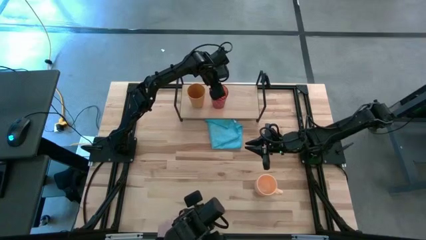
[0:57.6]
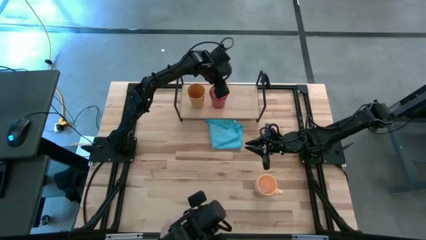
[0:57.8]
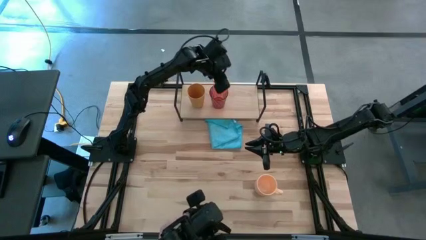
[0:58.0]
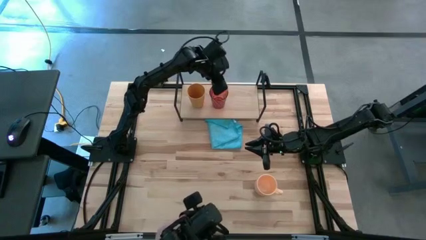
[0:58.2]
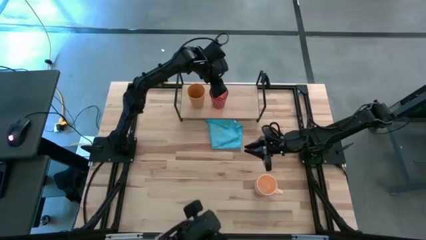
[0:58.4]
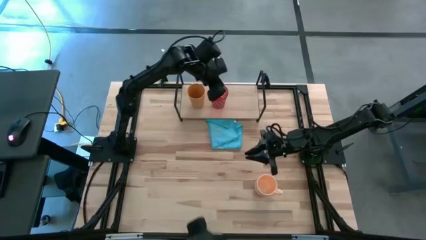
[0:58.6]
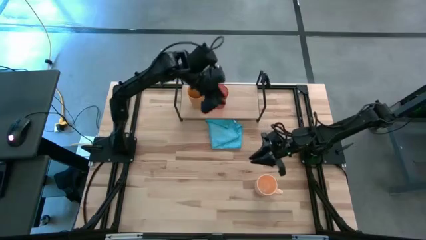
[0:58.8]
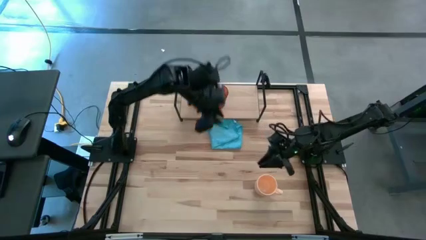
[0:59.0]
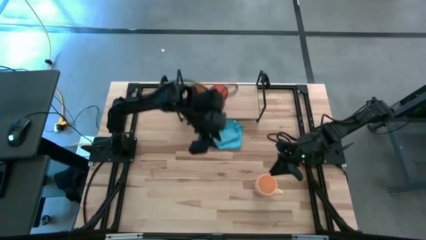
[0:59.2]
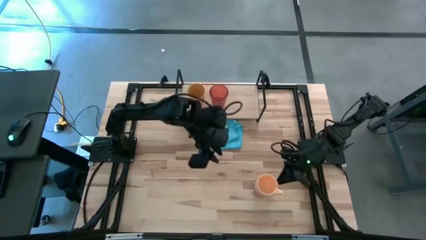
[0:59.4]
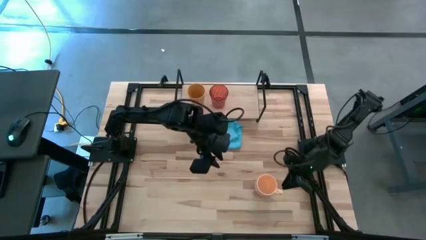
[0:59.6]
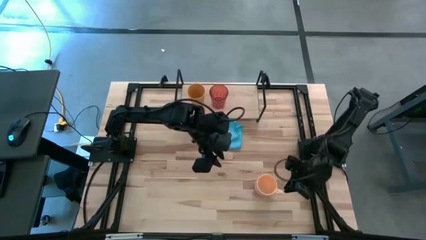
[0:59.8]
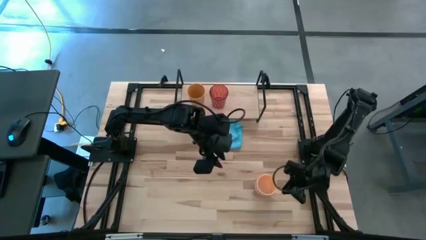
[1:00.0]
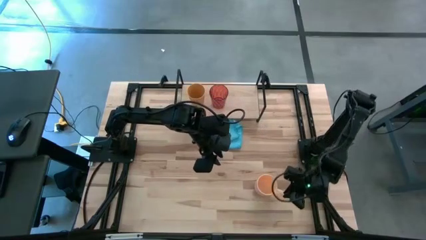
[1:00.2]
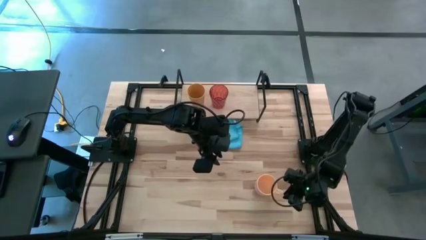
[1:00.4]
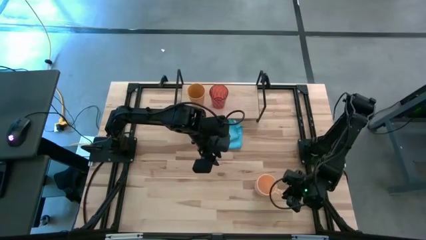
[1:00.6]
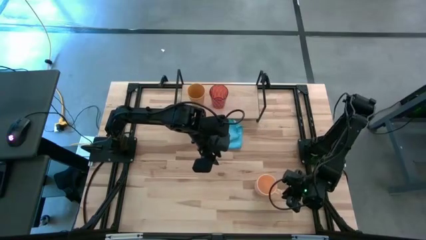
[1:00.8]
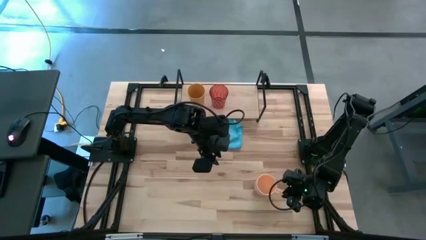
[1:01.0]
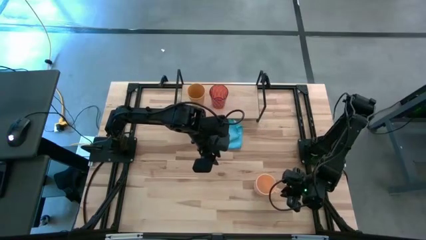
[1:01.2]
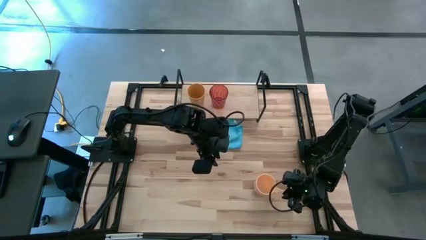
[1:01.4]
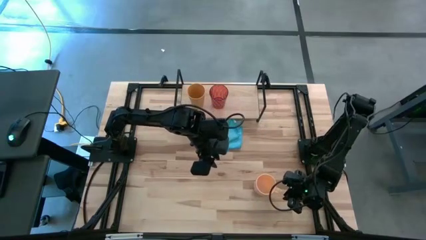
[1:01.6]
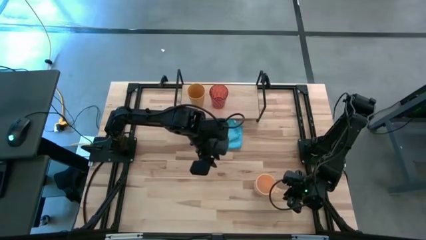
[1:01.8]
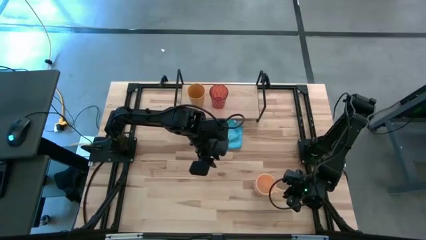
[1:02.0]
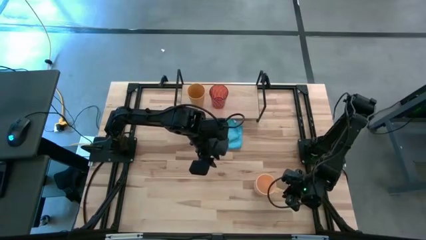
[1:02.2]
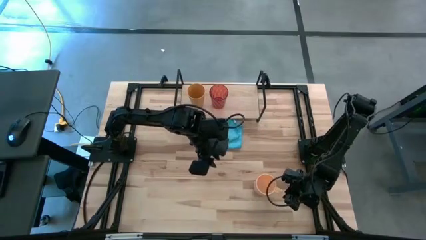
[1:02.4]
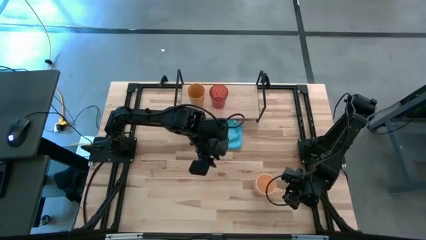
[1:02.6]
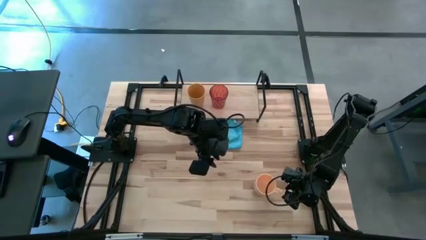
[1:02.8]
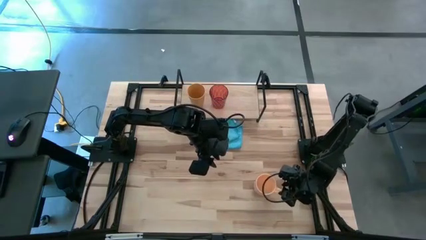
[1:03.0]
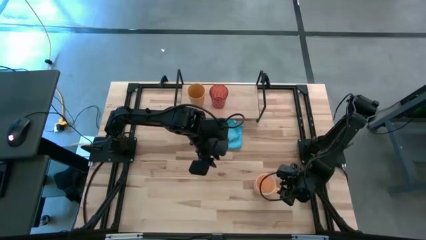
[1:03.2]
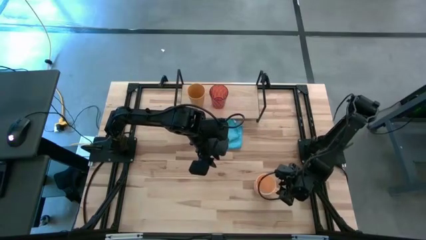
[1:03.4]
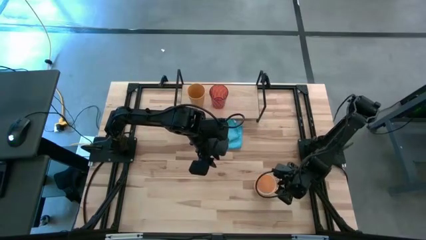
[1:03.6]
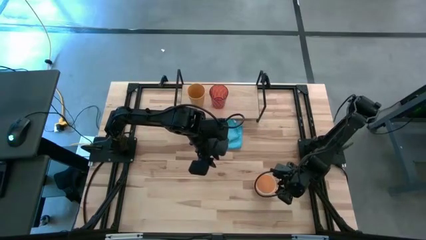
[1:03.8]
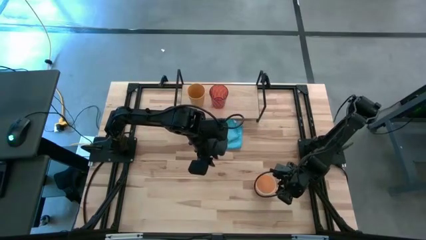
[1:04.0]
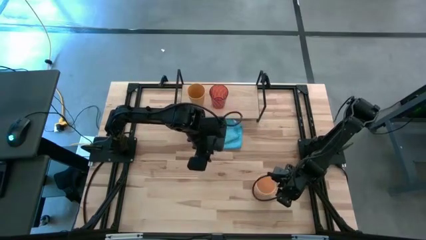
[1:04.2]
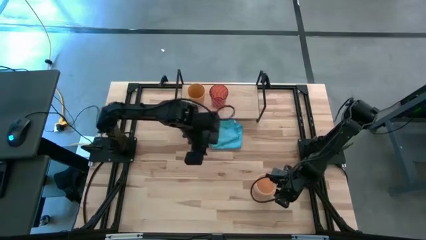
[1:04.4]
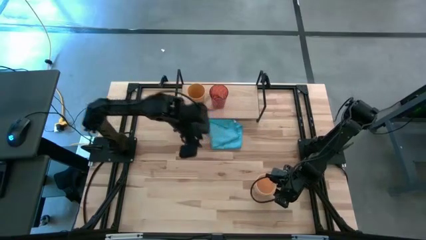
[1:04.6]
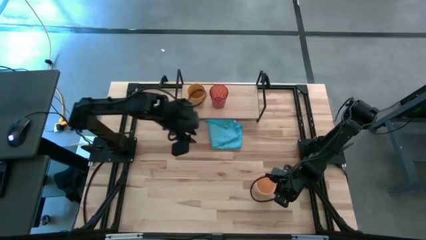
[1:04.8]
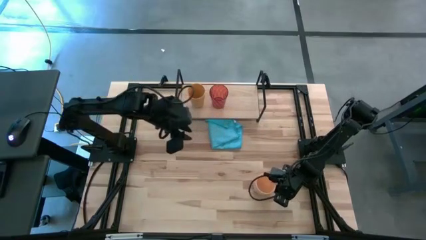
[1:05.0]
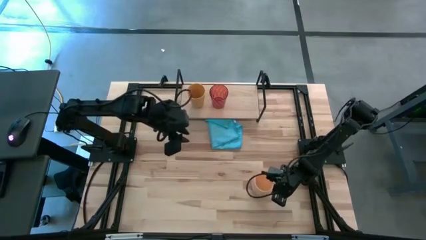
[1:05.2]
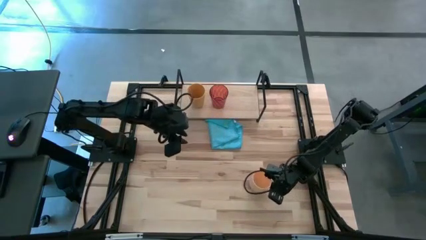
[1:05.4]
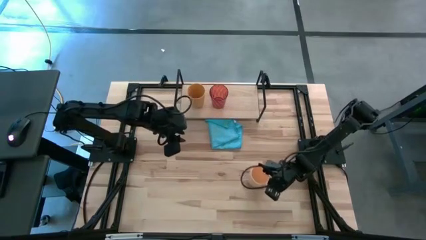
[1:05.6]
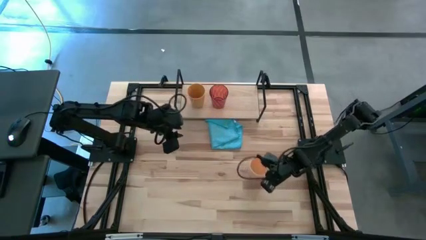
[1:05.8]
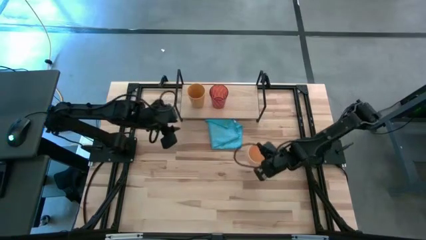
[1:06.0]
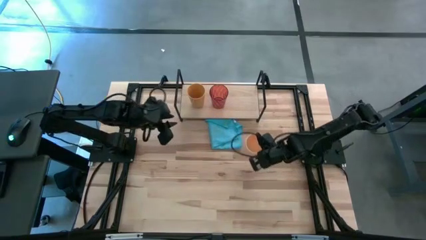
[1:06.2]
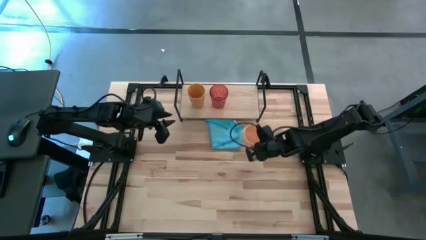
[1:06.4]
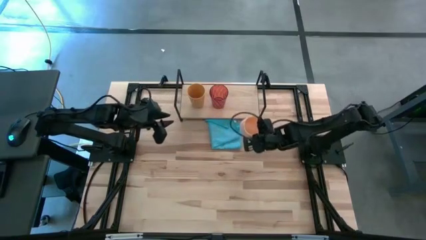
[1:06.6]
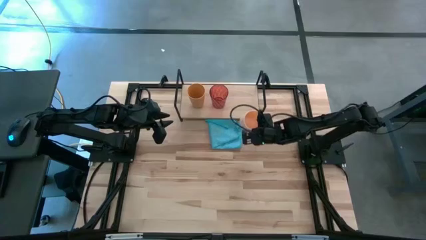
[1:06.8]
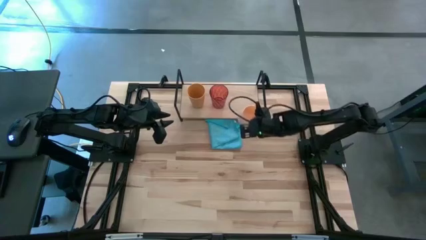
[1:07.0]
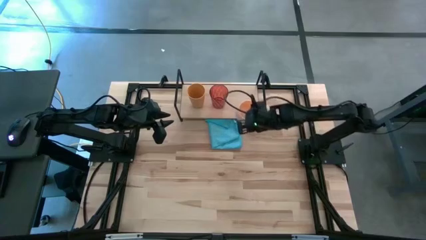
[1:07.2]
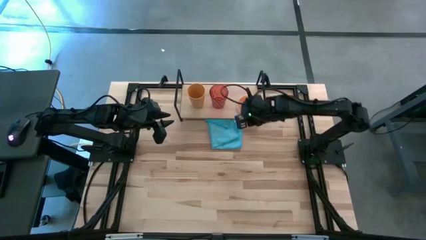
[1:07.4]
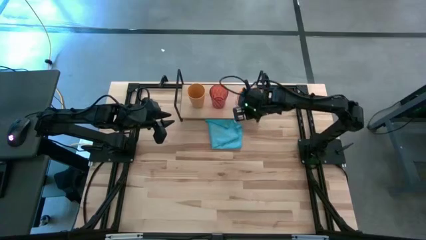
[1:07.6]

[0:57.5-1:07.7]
Task: Stack small to large cups/mugs on shelf
Put the light orange mug on the shelf

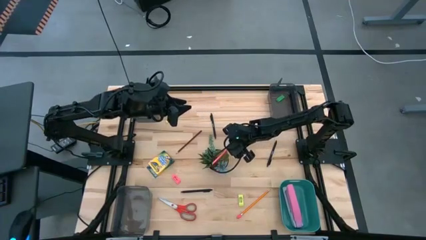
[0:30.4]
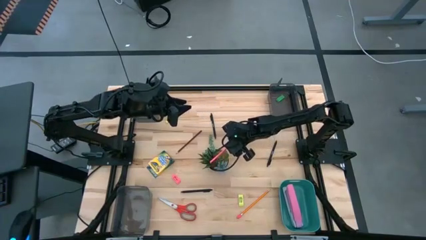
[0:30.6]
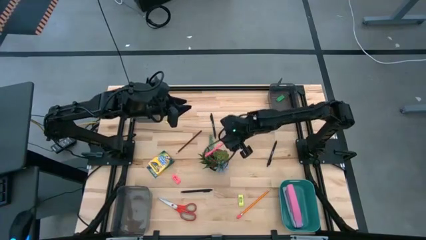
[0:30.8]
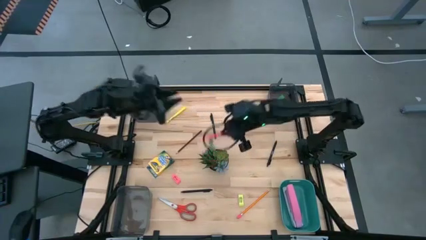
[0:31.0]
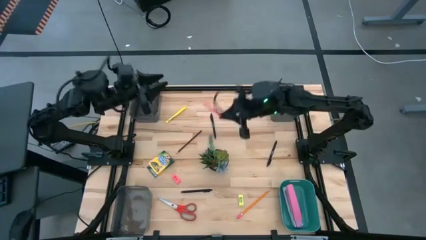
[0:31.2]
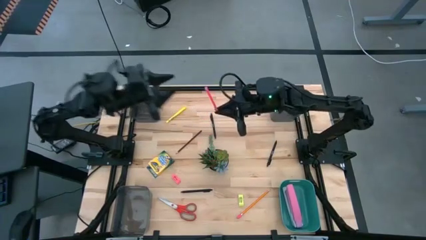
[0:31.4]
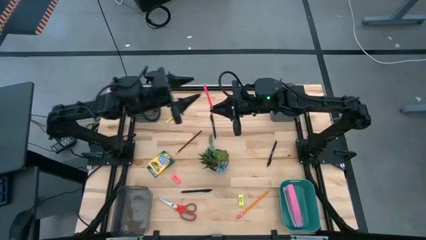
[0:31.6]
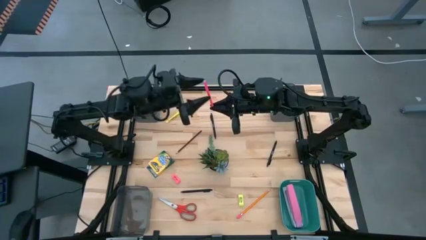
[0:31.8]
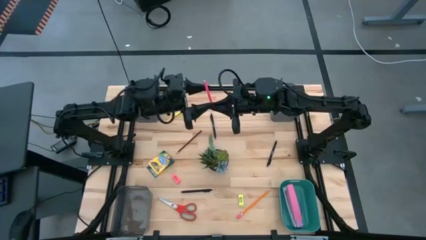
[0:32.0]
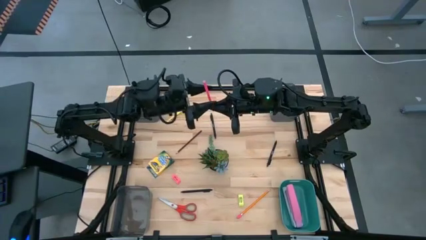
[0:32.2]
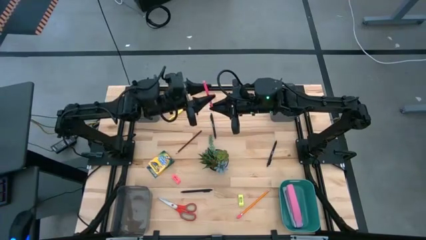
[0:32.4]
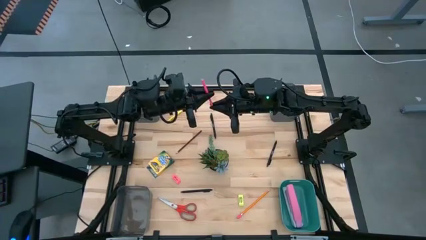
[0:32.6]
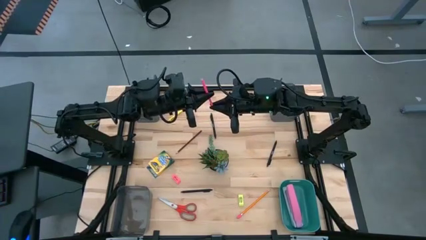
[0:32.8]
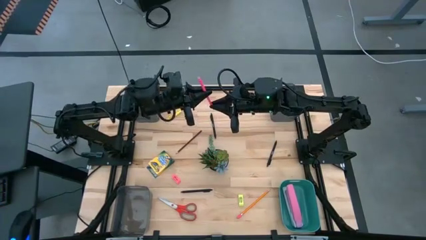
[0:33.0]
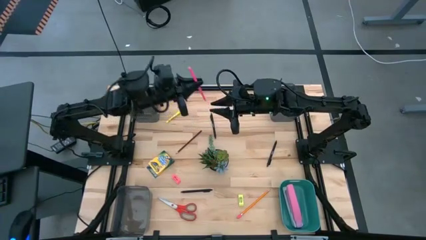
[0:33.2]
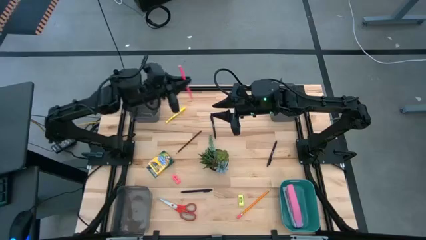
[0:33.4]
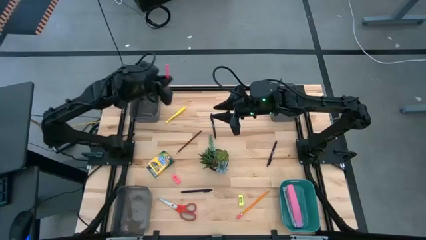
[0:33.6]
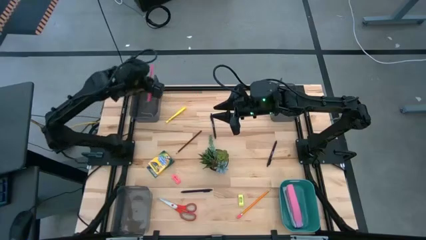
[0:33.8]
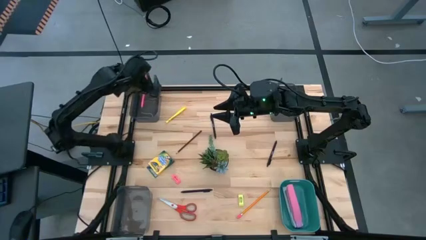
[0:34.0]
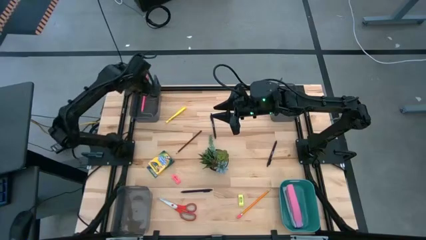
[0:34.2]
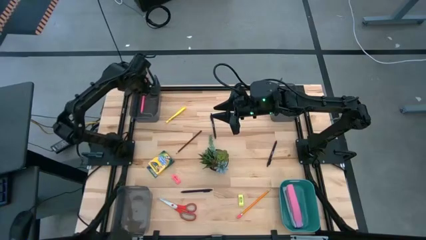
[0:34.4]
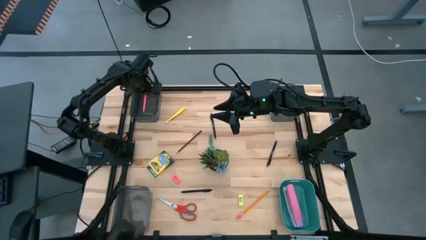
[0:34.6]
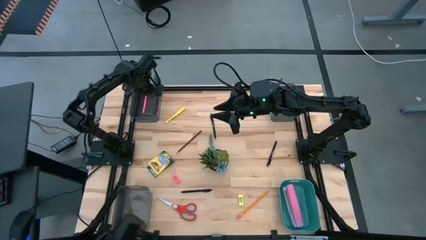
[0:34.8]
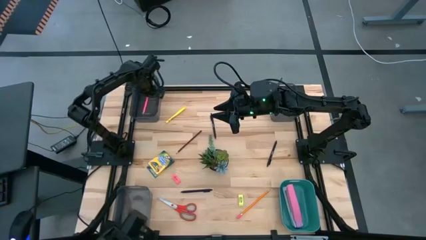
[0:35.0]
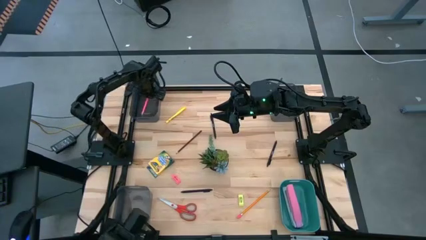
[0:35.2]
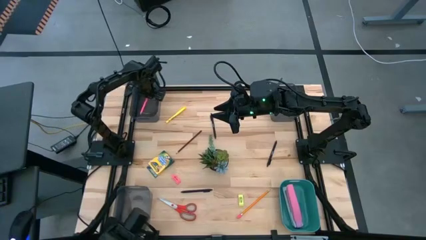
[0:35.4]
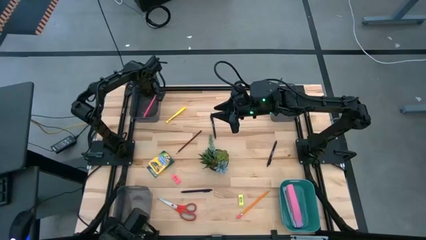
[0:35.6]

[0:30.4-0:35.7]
Task: Sort crayons/erasers/pens/pencils in bins
Put the pink pencil into the top left black bin
